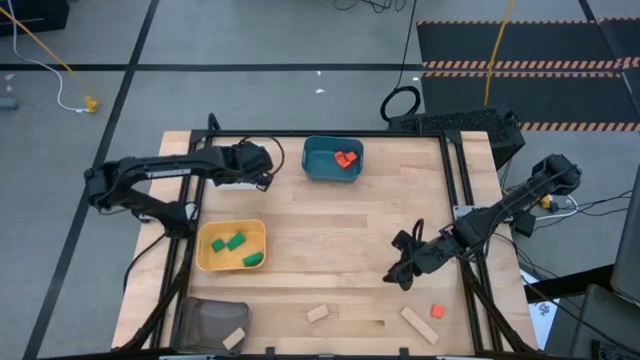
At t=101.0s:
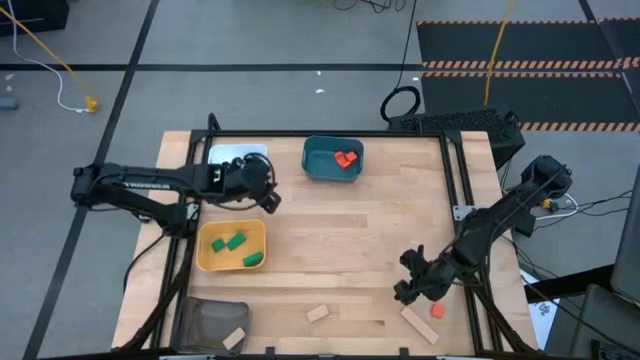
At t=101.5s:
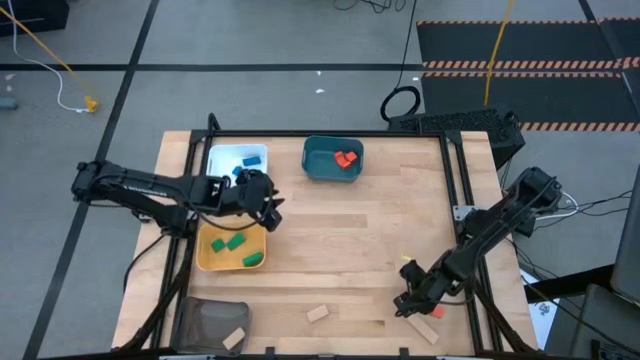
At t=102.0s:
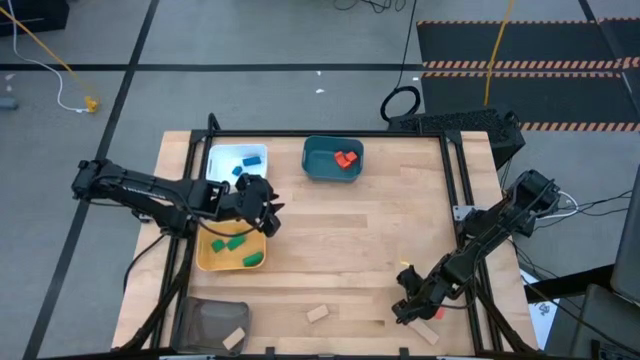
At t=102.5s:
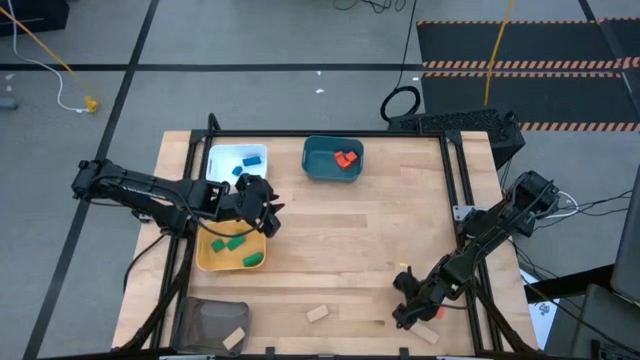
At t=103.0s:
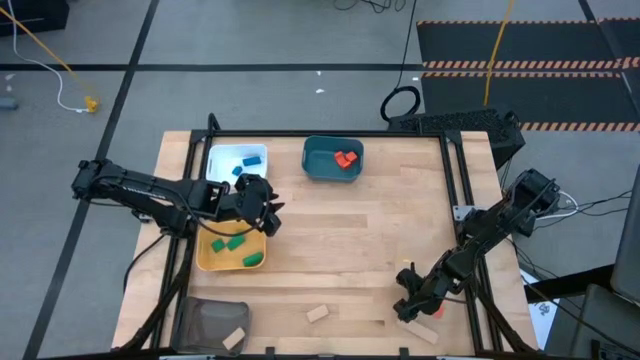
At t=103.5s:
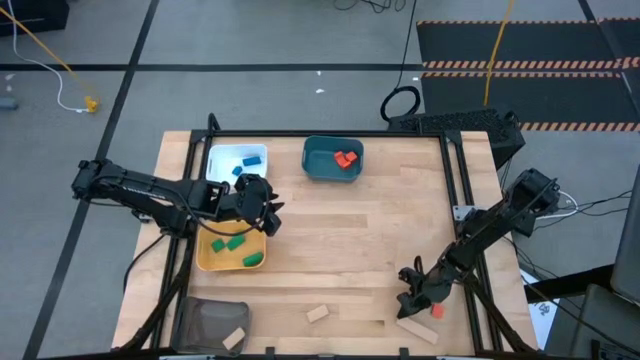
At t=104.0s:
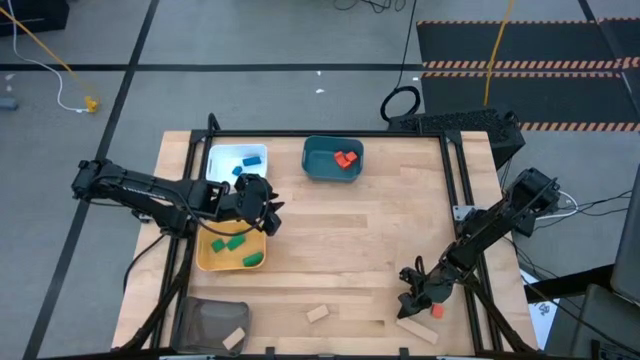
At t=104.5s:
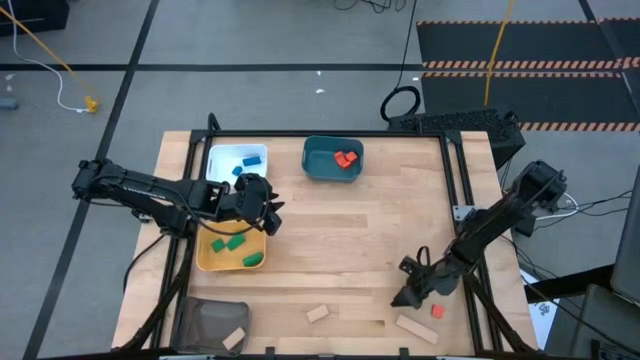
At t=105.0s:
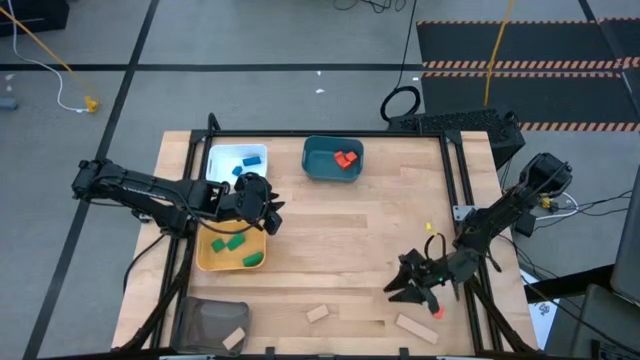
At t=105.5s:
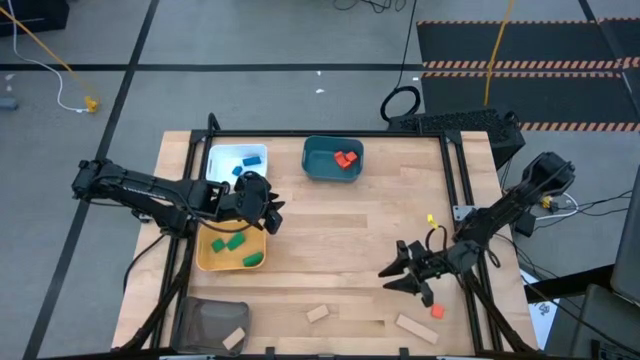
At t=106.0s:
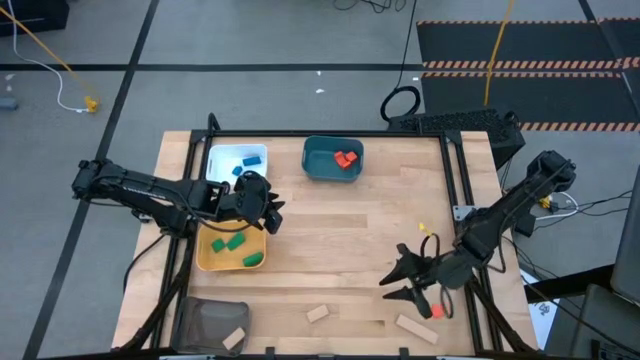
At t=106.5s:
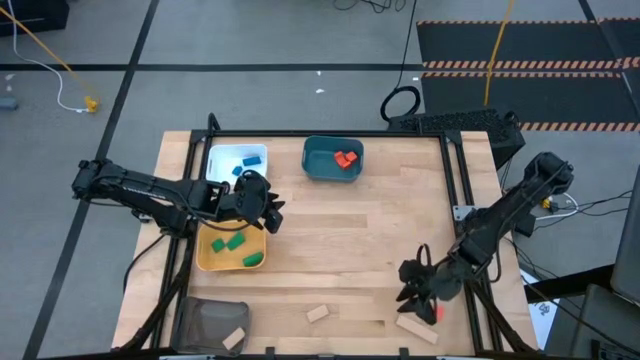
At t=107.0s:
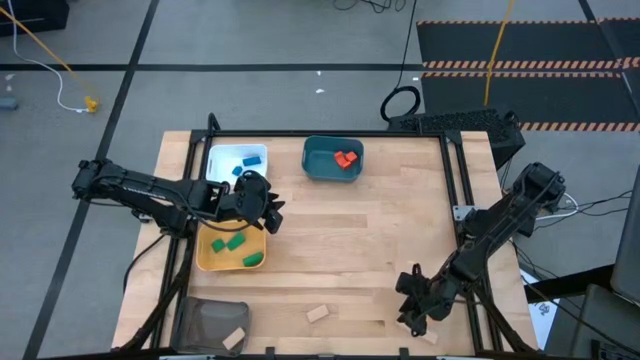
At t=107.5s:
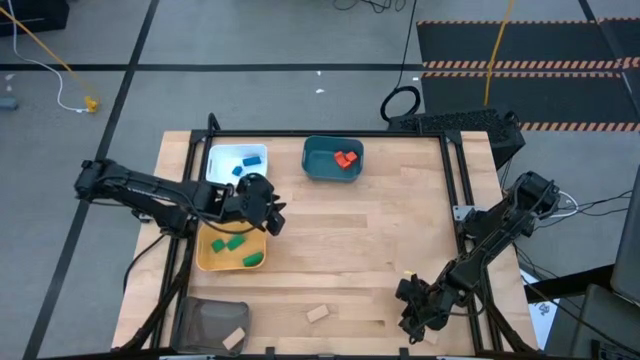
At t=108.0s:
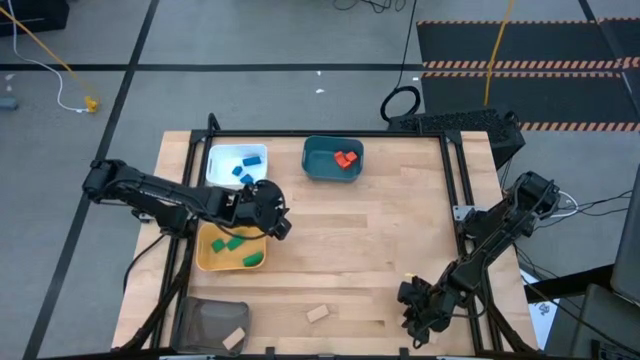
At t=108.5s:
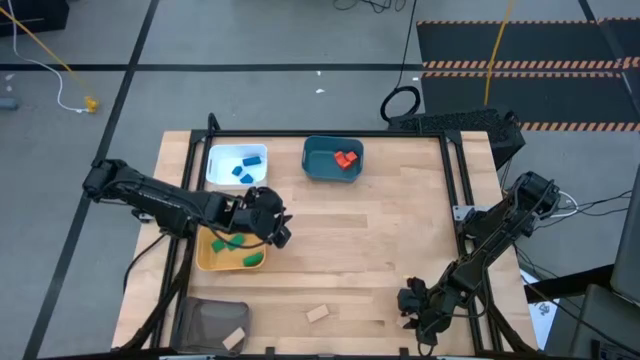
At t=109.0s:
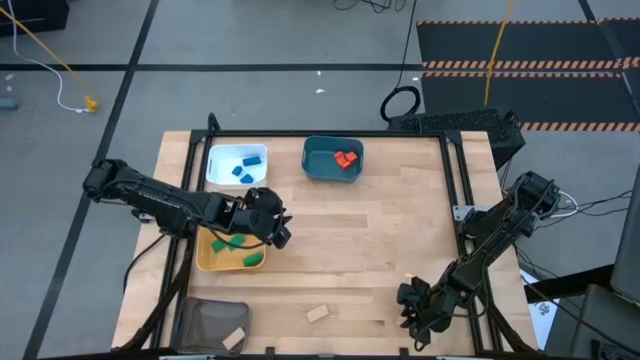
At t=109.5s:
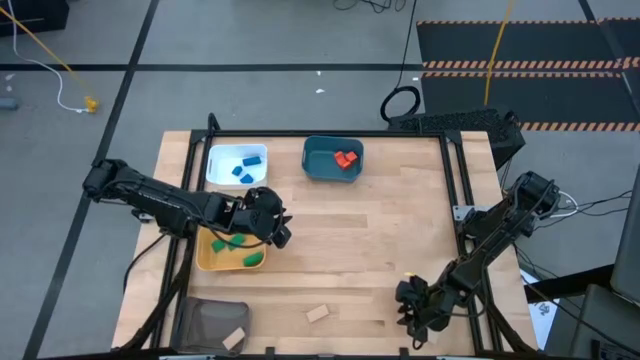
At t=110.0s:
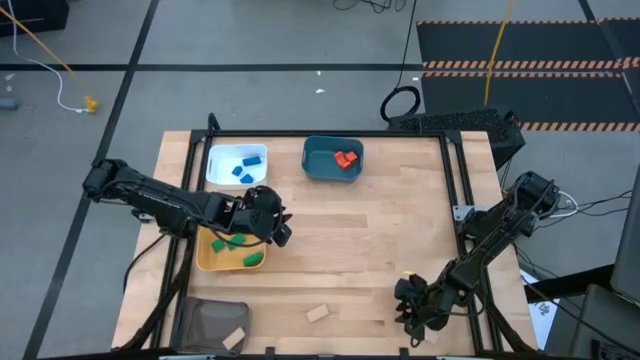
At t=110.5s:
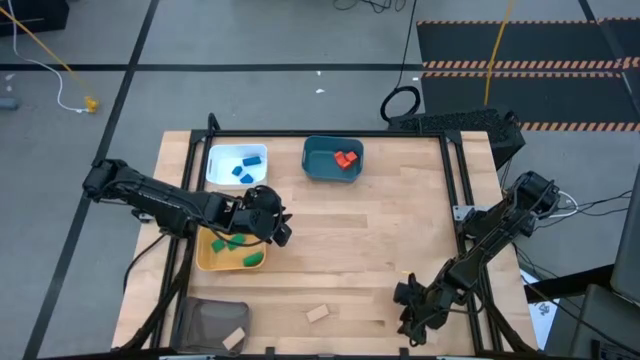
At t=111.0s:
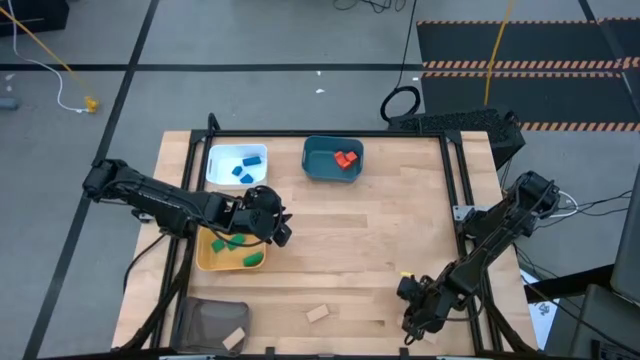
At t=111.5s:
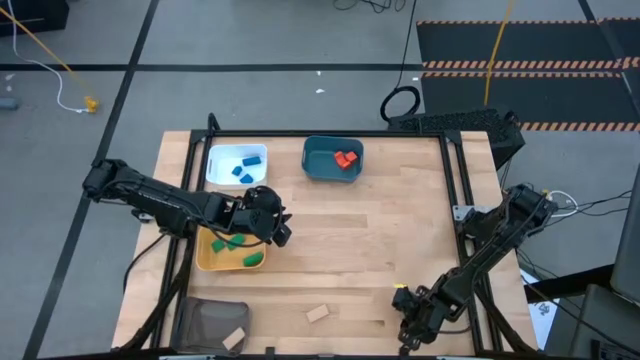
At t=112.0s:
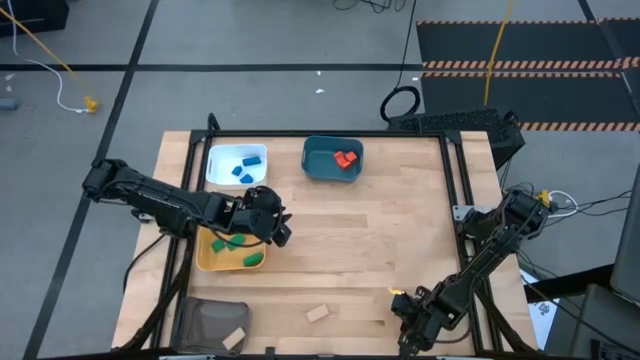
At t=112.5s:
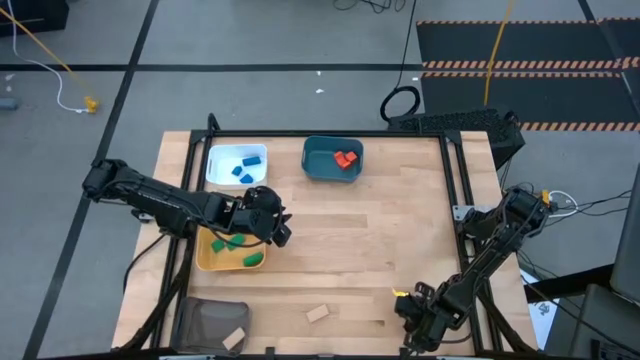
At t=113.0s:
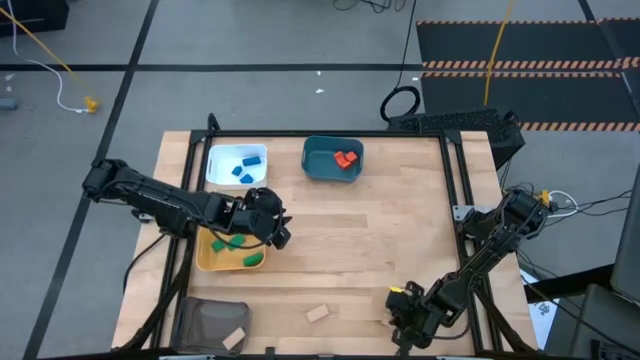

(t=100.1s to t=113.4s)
Task: Sort & place blocks by color
Put the right brown wooden block into the black bin

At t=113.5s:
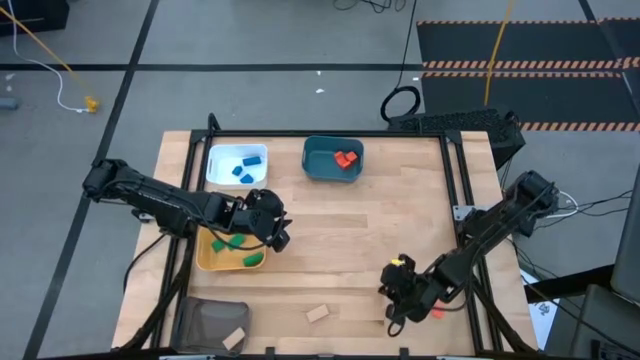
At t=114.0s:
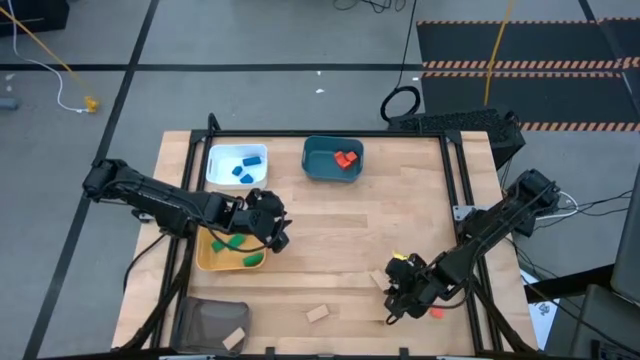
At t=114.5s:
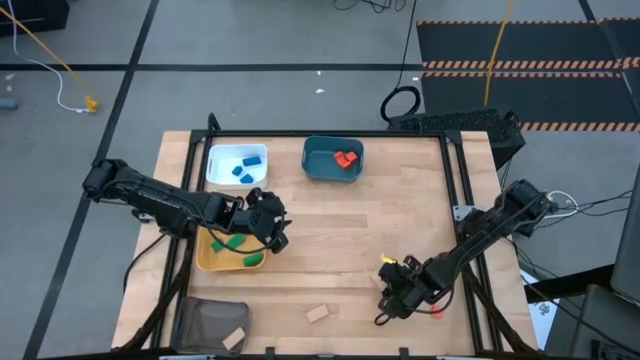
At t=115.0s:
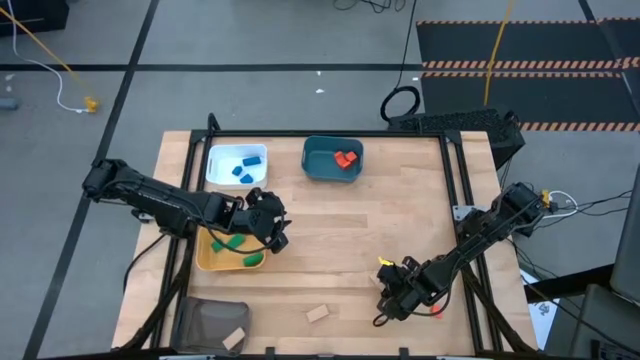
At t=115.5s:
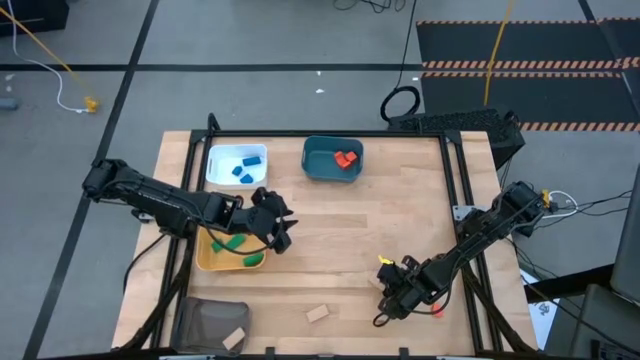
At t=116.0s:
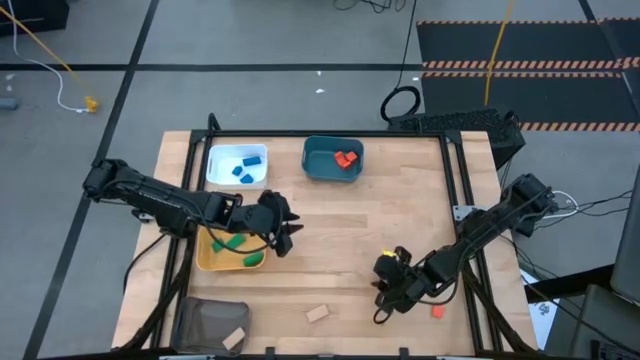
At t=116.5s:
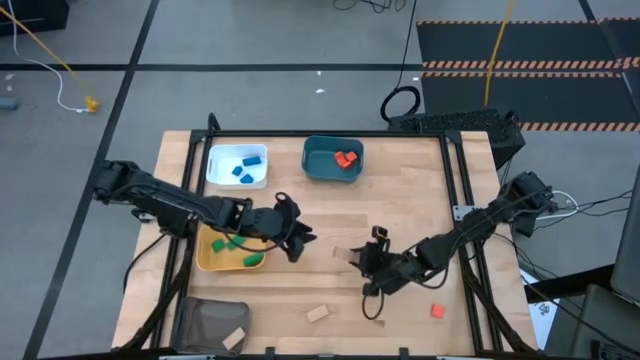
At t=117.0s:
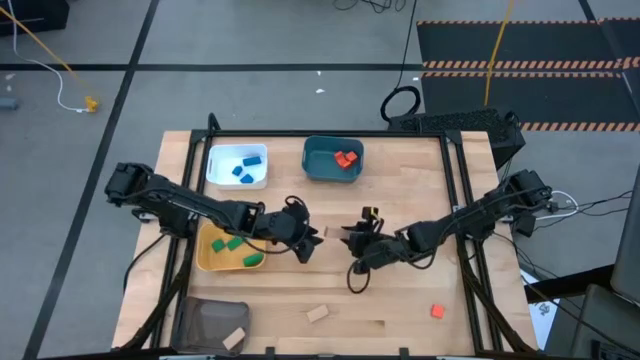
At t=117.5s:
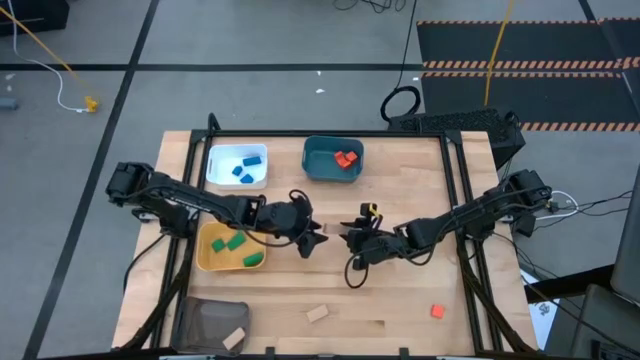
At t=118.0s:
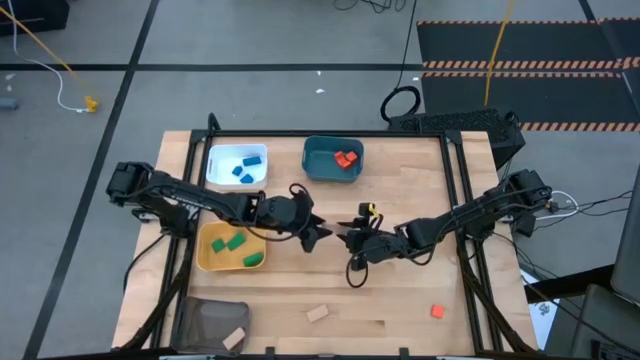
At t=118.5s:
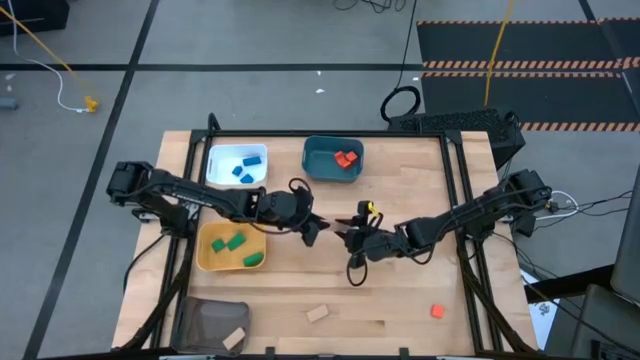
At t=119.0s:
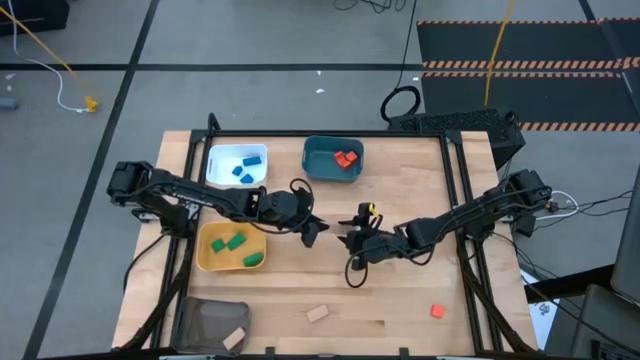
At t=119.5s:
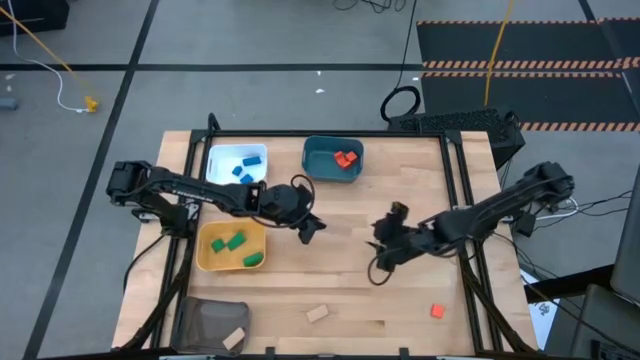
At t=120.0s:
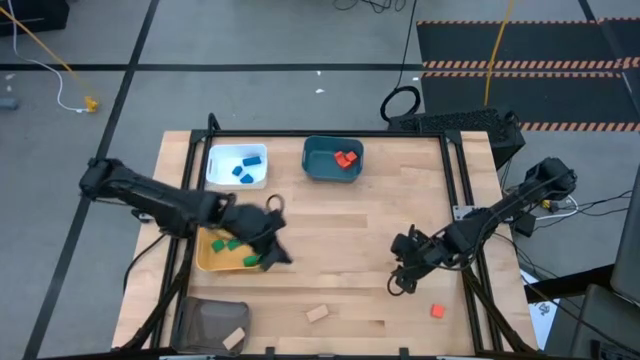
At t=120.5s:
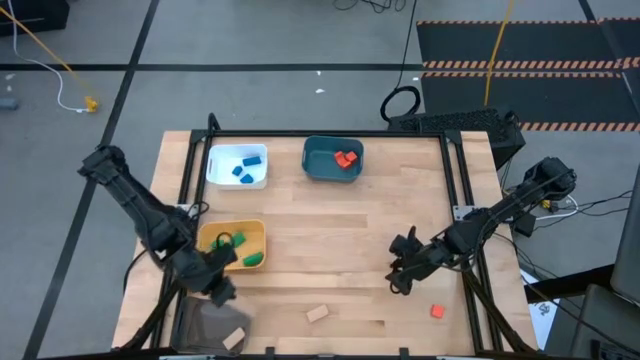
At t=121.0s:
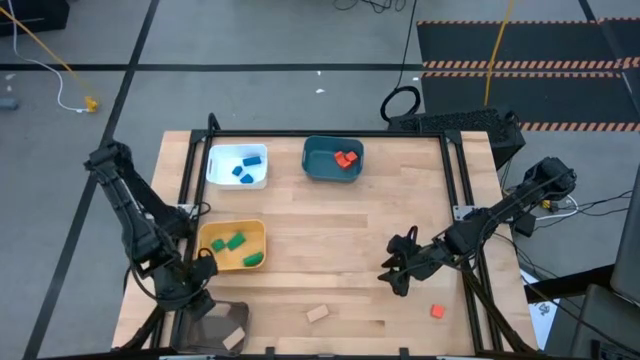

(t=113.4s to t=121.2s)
Put the right brown wooden block into the black bin
